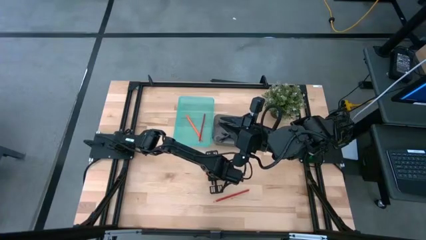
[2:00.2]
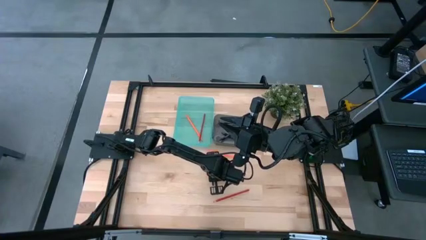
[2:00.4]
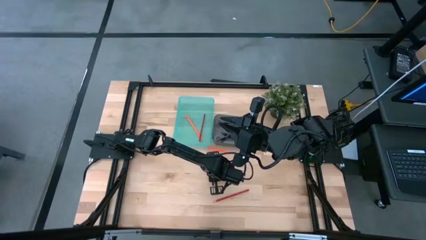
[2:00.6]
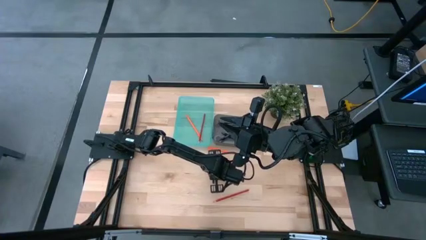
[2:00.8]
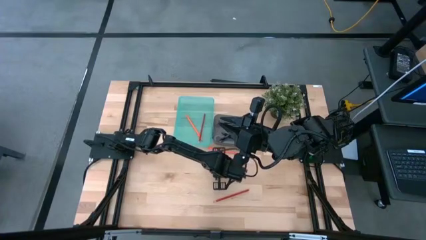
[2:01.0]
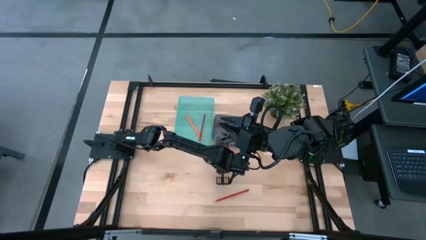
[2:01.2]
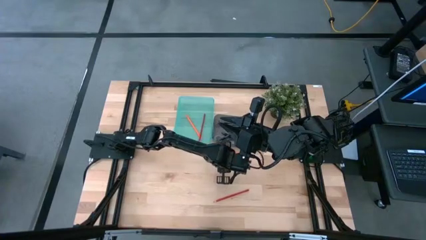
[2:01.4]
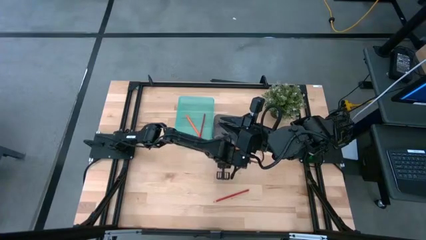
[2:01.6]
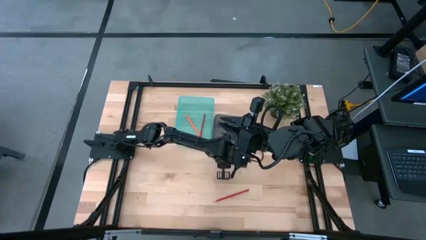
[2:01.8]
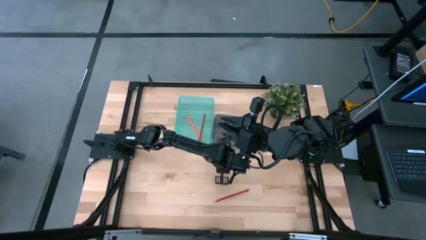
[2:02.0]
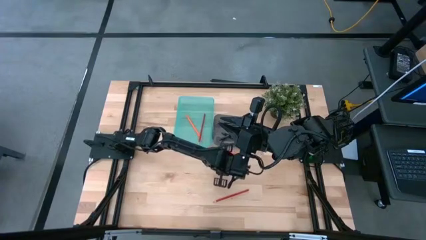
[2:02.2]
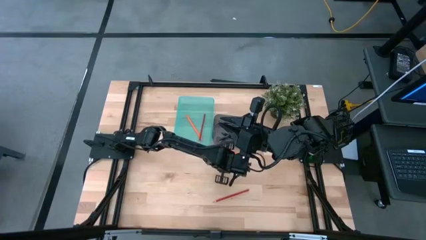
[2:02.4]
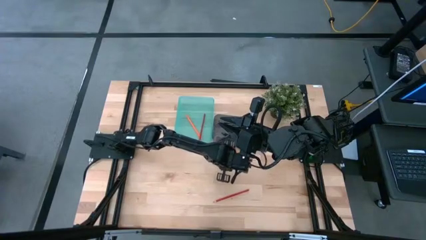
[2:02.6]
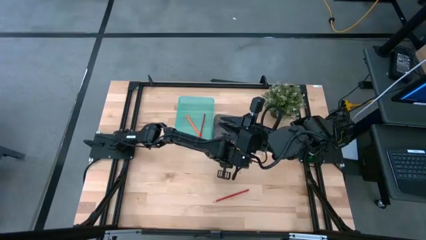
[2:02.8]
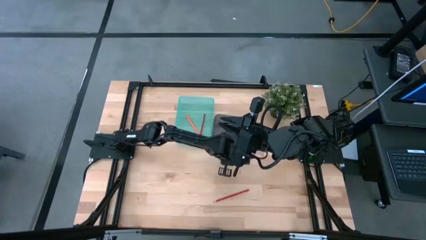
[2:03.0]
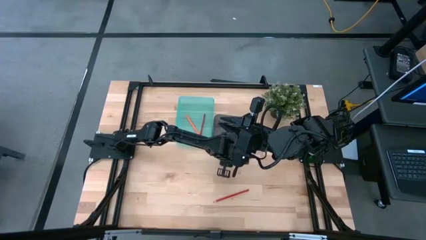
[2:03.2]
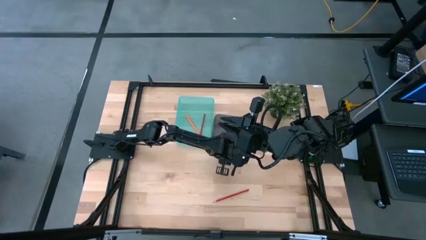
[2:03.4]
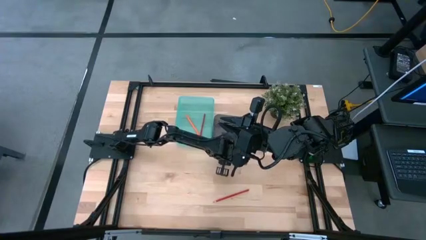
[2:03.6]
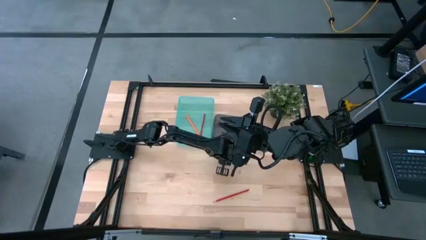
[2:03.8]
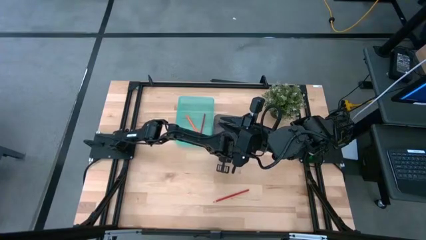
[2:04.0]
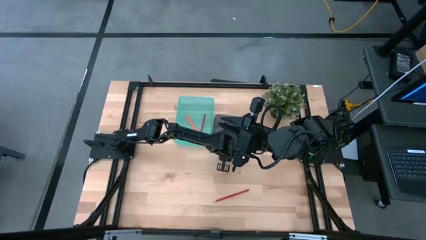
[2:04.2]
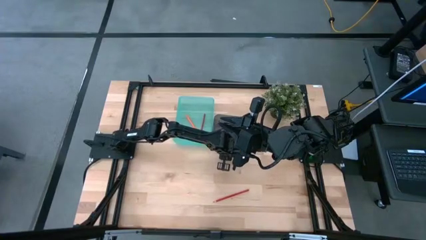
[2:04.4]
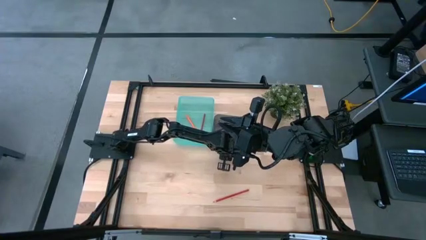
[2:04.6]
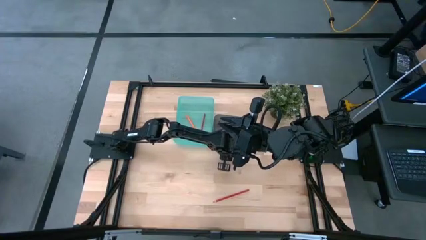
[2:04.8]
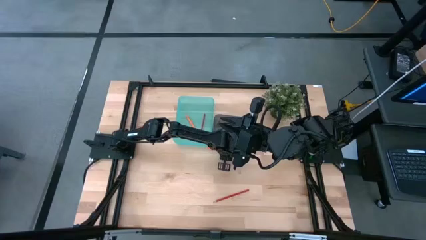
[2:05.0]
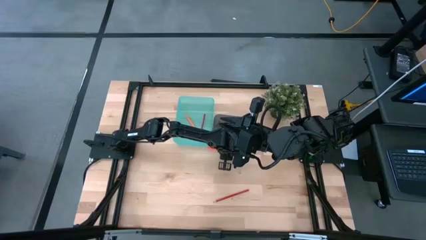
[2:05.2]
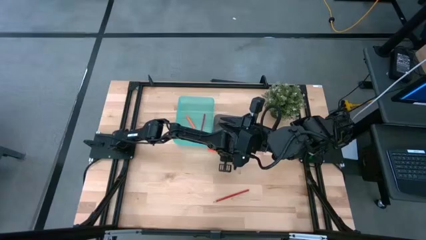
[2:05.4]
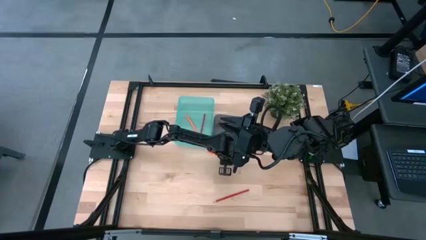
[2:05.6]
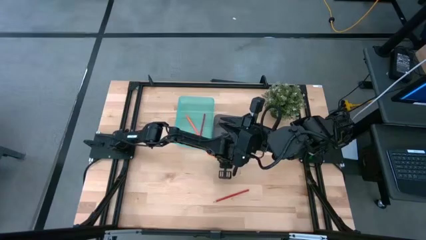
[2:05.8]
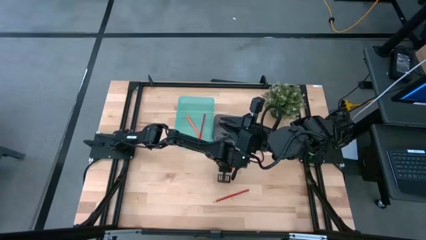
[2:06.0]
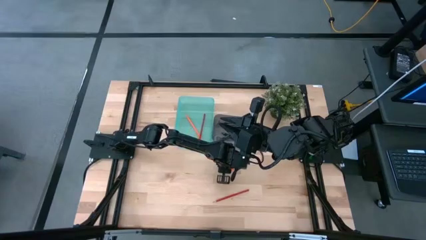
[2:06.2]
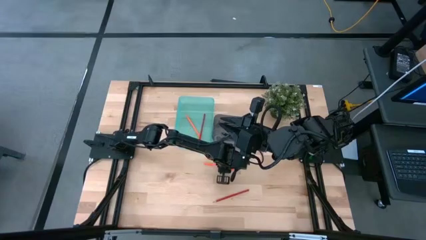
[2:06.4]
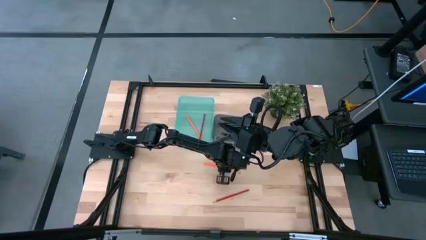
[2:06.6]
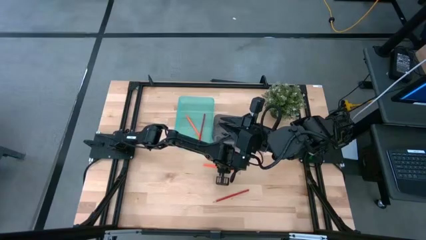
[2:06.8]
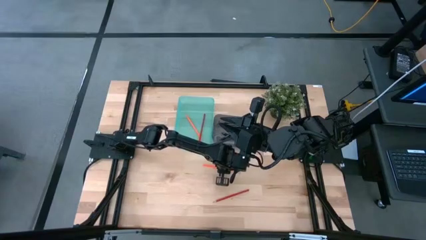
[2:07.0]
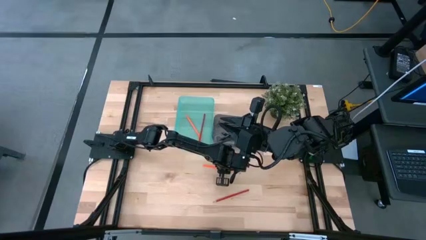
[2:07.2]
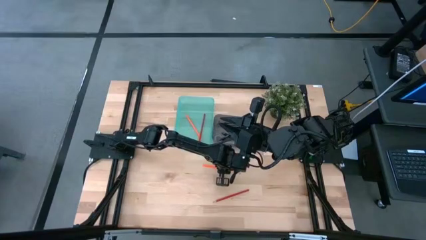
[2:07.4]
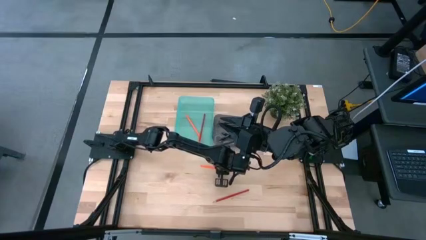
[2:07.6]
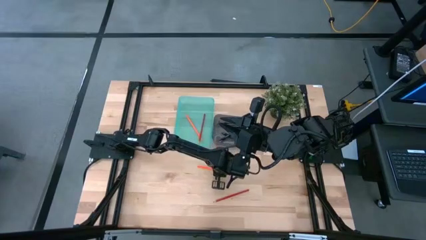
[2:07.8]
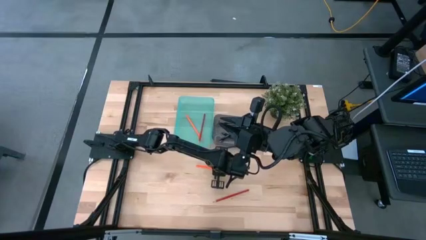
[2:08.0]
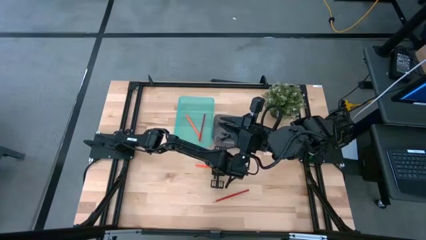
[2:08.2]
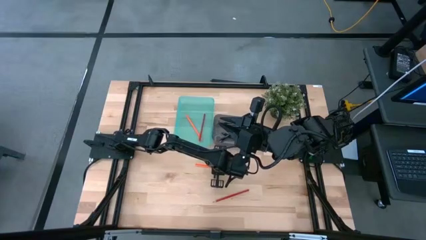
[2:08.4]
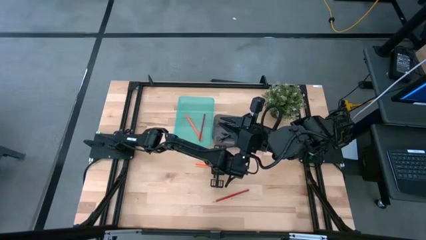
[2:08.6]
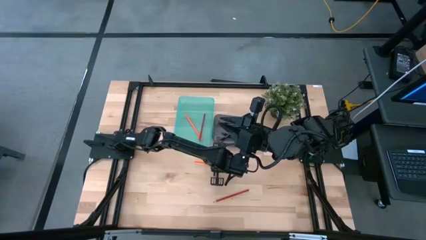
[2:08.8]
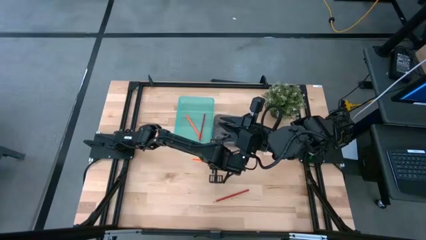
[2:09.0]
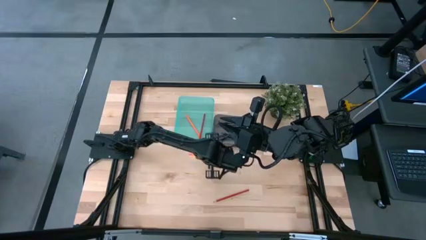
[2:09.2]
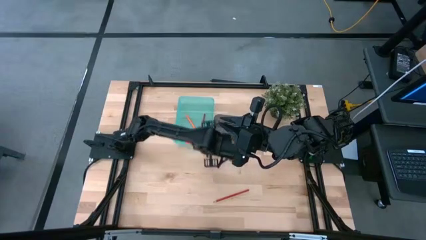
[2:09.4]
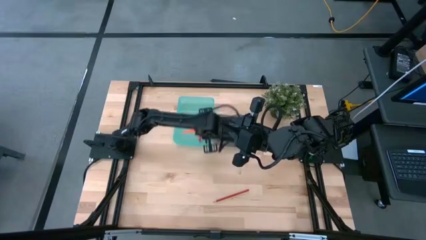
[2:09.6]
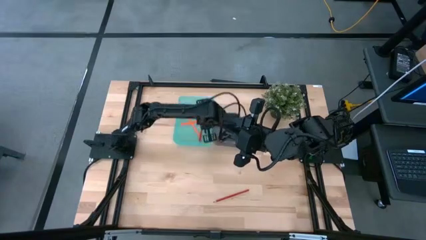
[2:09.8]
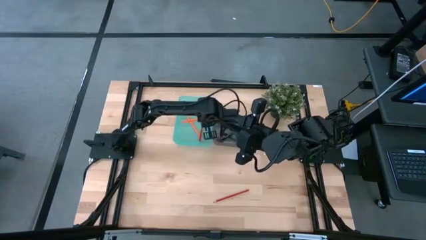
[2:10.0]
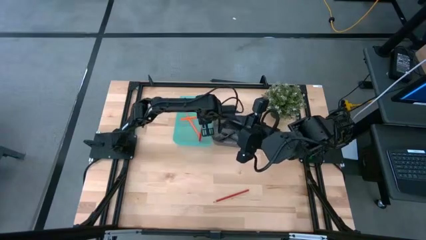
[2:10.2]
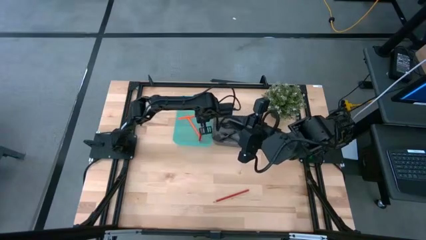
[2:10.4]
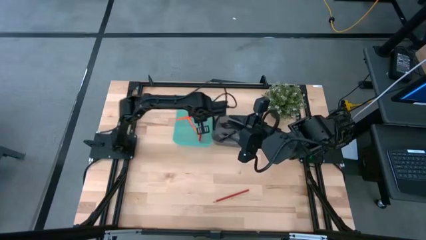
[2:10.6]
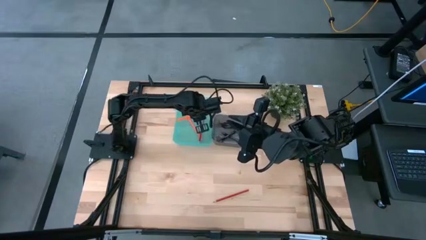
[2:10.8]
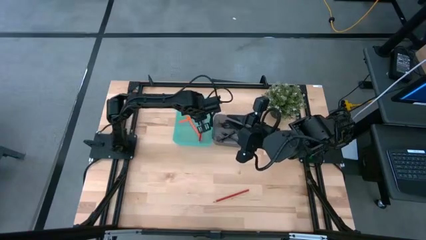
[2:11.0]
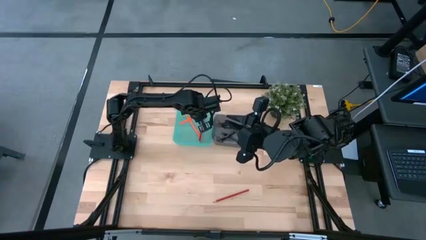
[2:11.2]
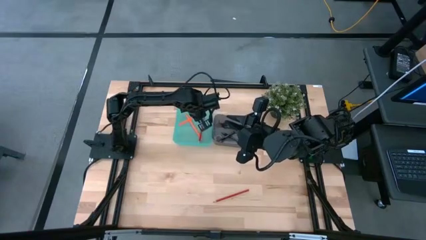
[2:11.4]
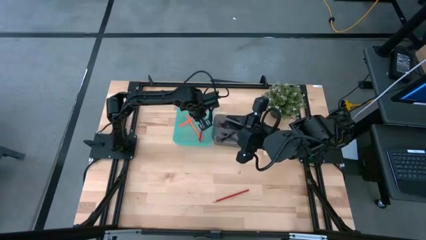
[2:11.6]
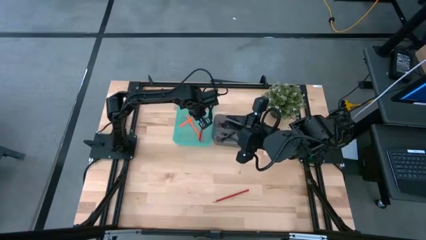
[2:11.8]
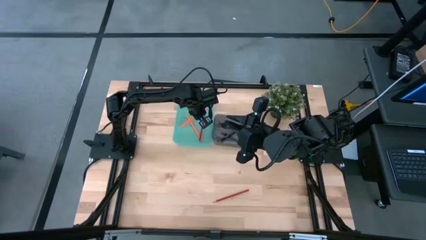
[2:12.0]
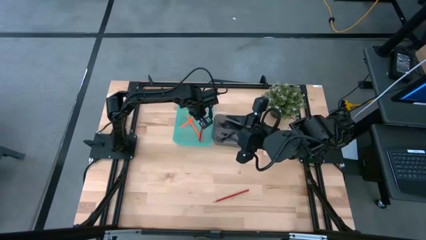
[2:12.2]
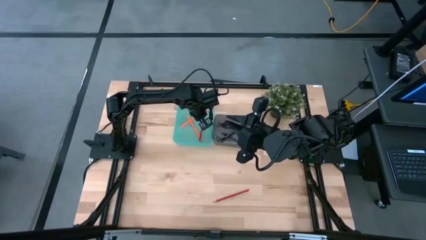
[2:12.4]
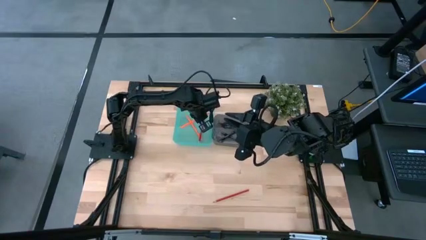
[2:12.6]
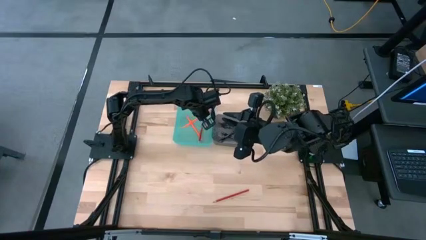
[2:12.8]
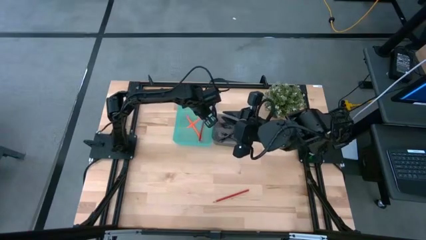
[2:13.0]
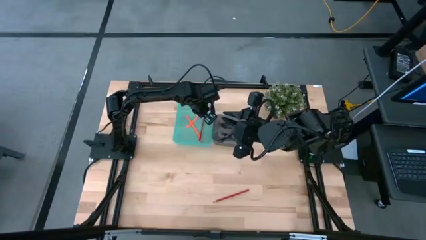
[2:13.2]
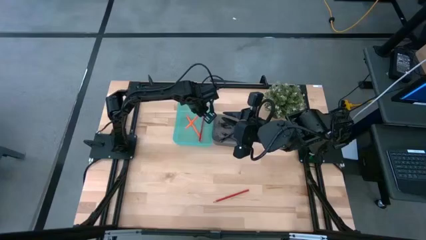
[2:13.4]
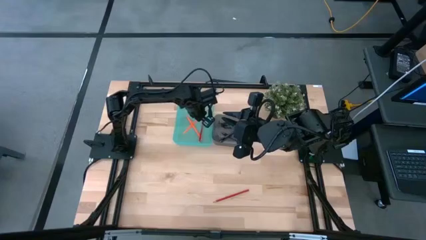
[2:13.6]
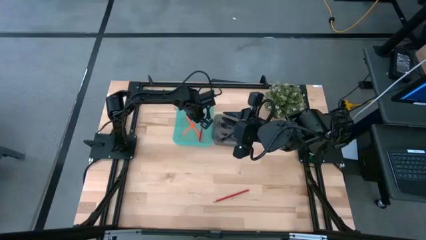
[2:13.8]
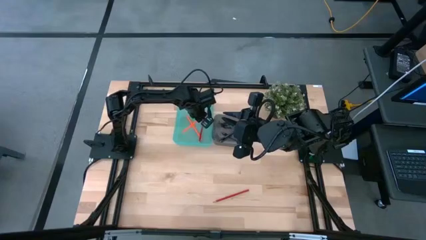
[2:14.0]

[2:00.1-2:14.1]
Task: Sort pens & pencils
Put the orange colored pencil into the green bin
